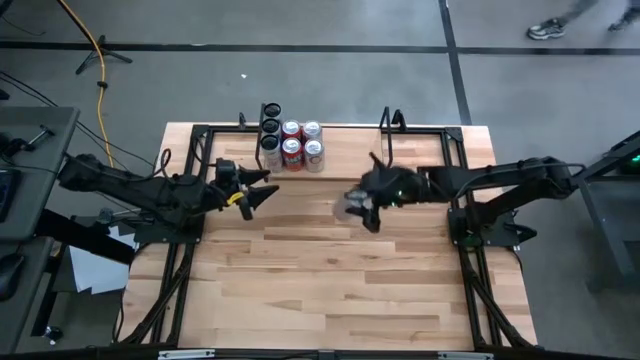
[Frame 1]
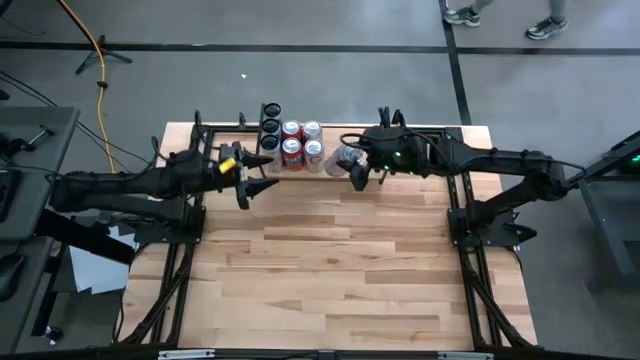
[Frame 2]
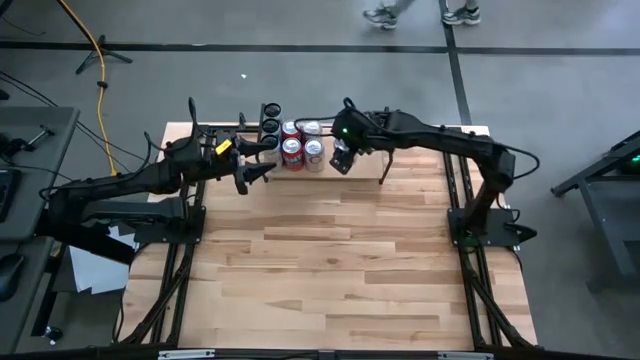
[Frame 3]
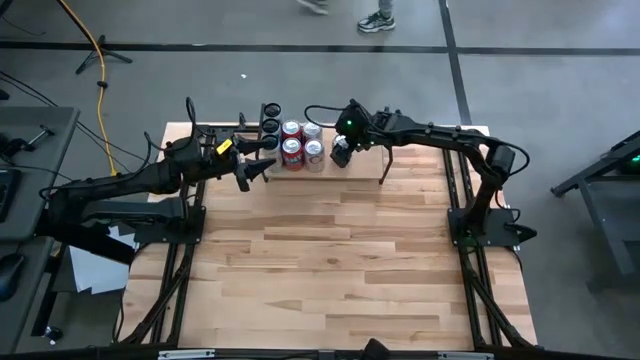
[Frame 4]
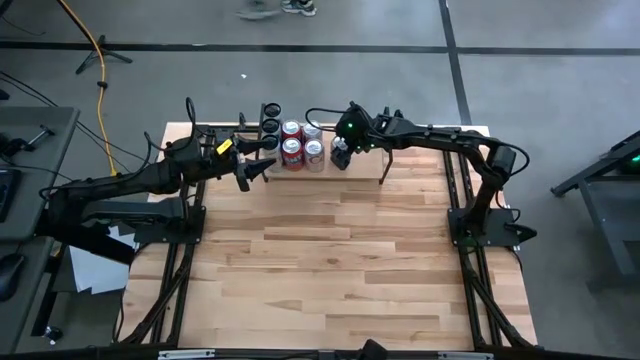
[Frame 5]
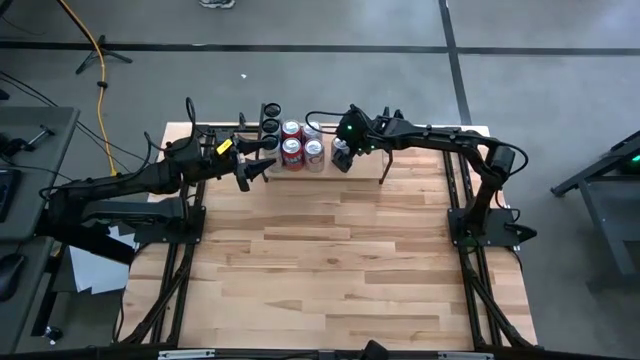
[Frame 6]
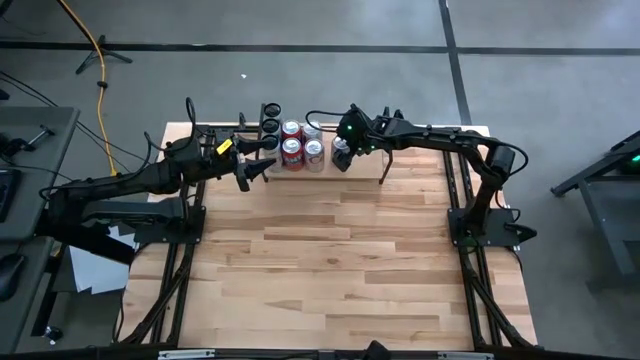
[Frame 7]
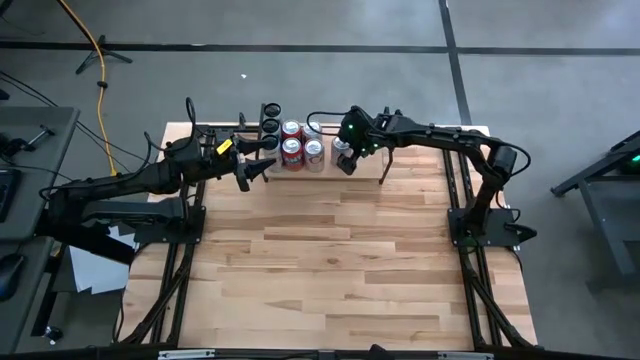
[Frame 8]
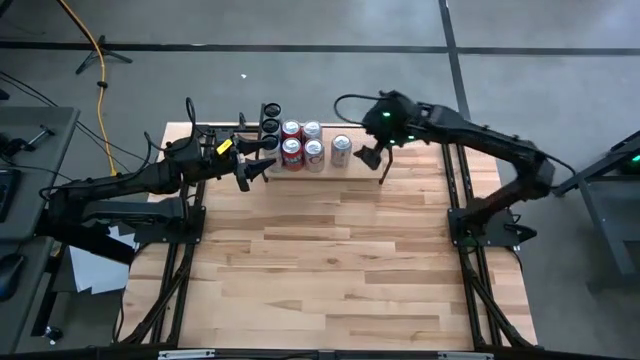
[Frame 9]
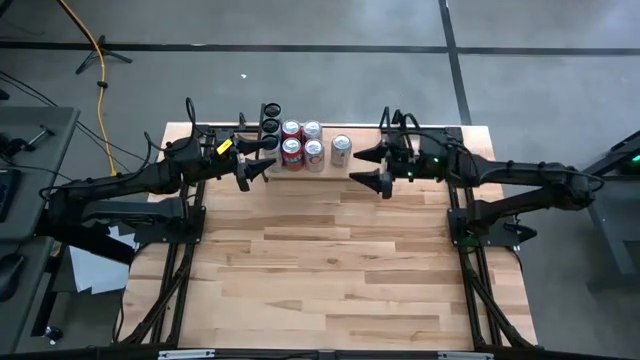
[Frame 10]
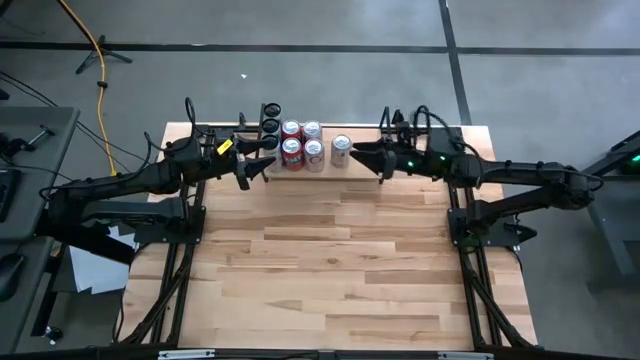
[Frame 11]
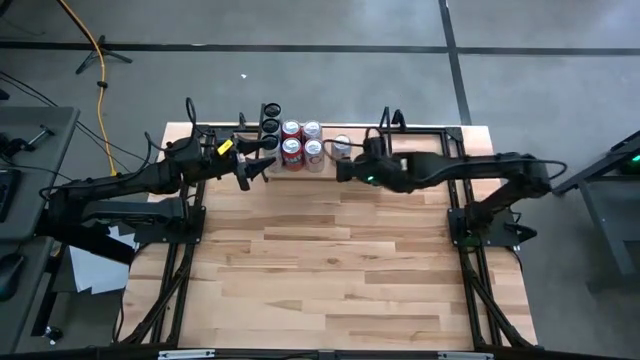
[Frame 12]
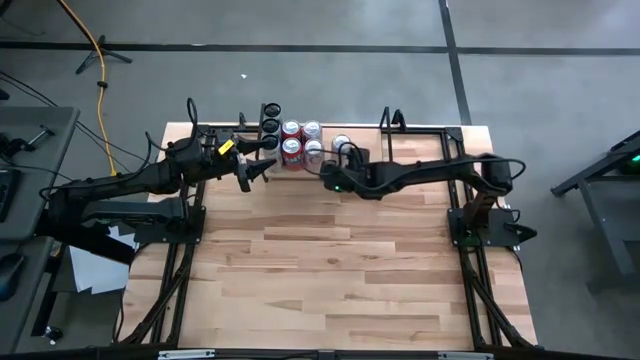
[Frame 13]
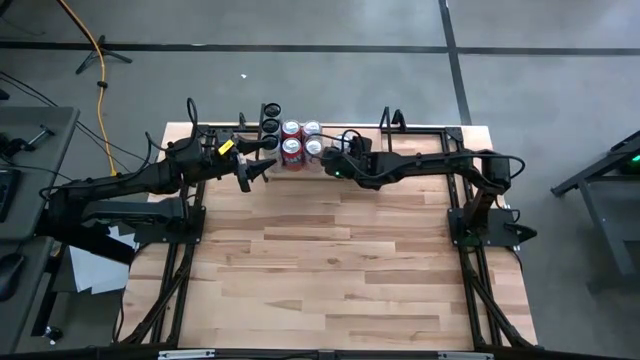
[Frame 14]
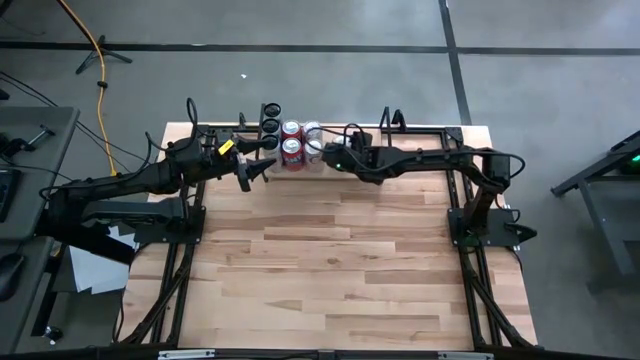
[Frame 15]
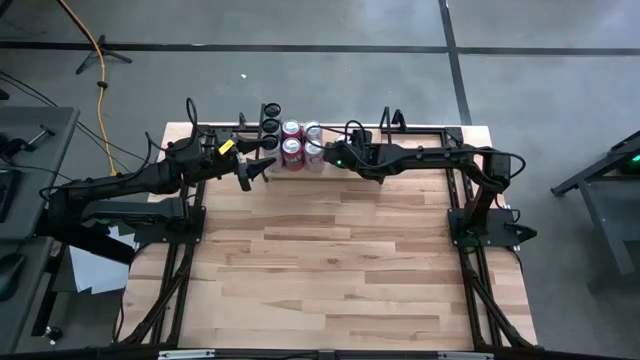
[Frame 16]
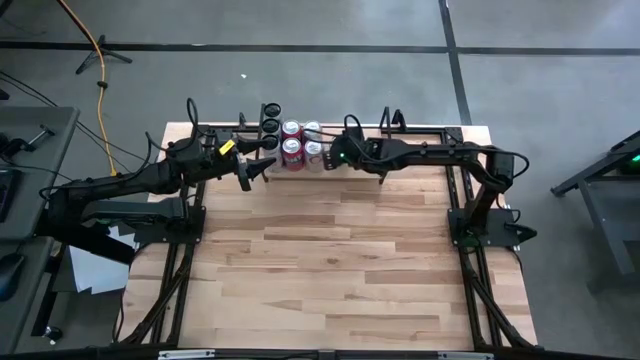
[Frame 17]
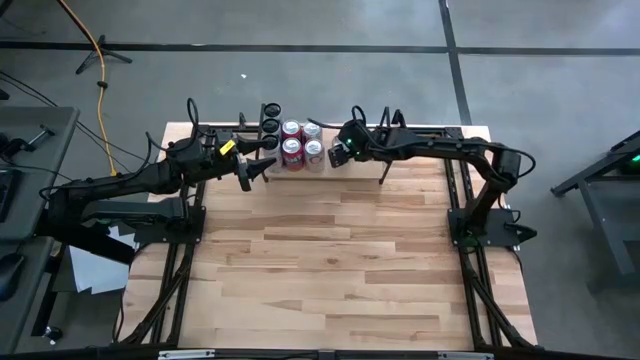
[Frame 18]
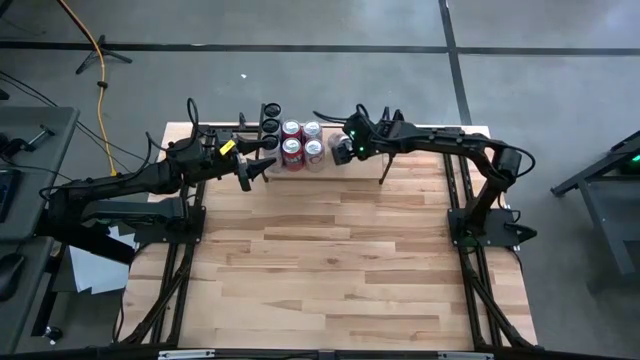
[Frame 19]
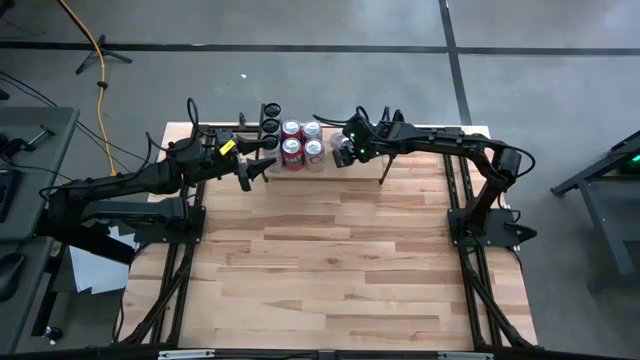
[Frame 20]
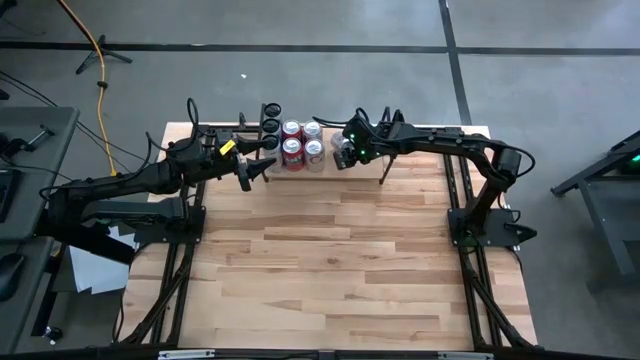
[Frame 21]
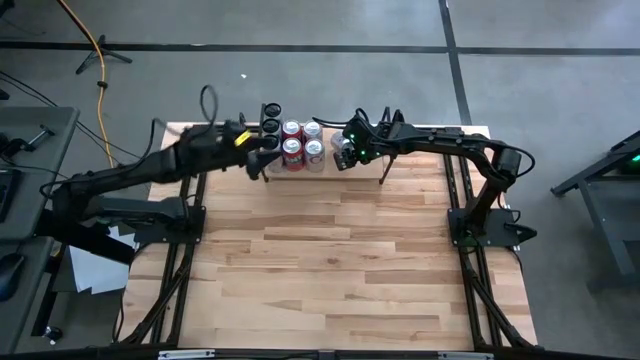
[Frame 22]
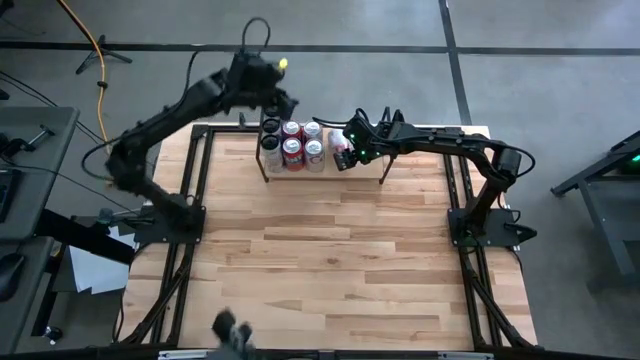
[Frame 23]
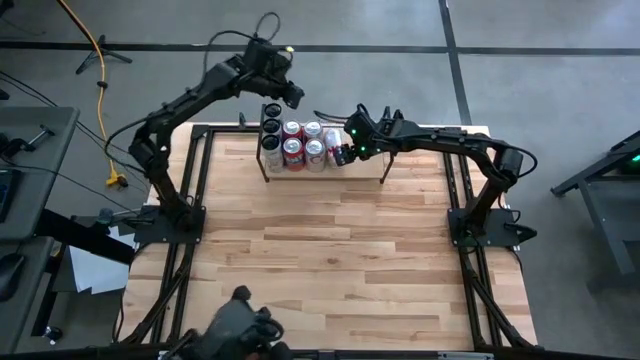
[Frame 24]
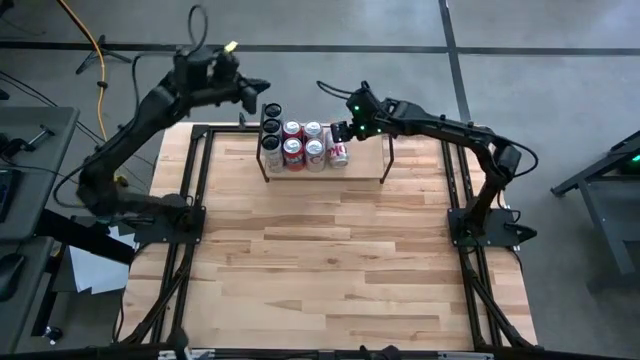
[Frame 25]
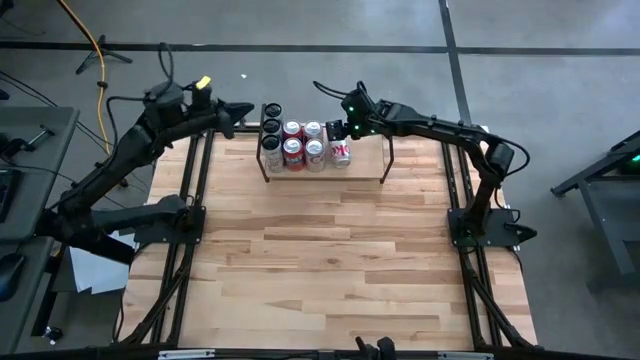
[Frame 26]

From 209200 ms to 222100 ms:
Task: Place canned beverage on shelf
Put the silver soda can aligned with the other silver soda can on the shelf

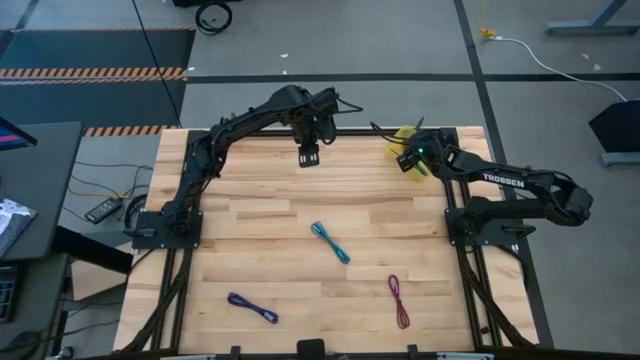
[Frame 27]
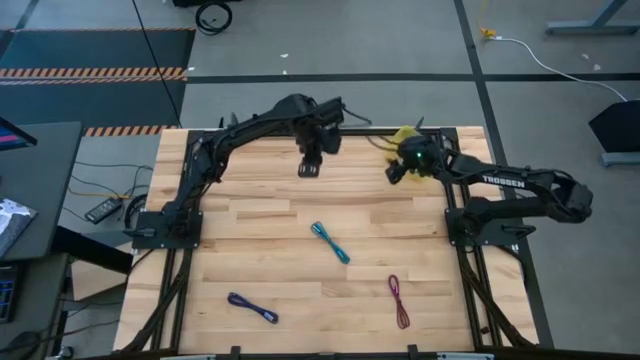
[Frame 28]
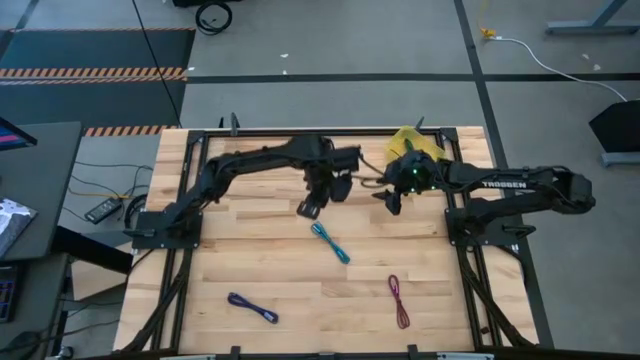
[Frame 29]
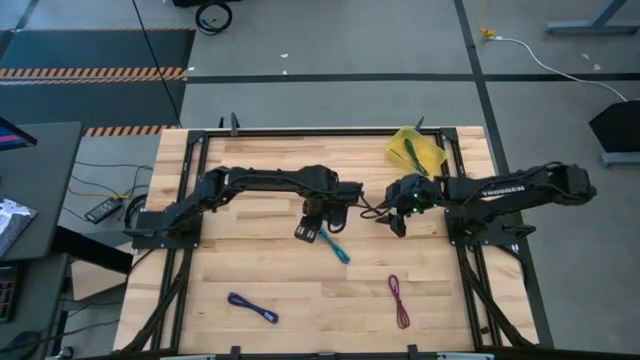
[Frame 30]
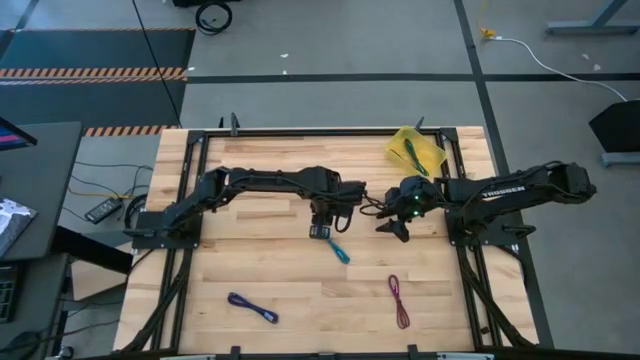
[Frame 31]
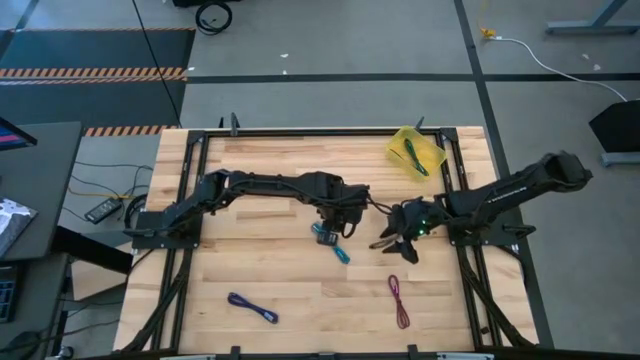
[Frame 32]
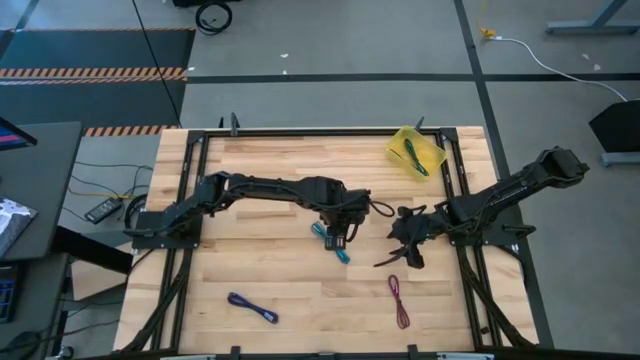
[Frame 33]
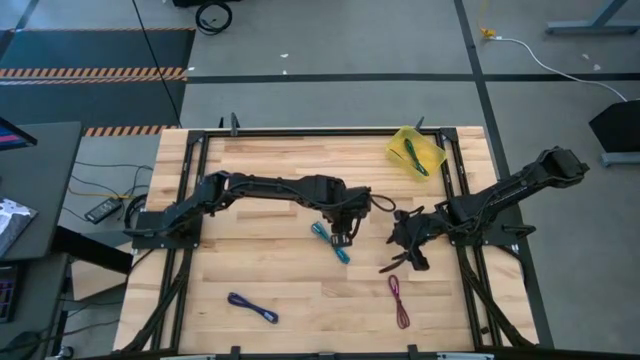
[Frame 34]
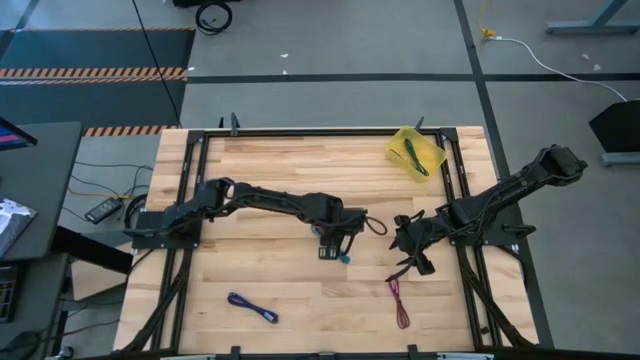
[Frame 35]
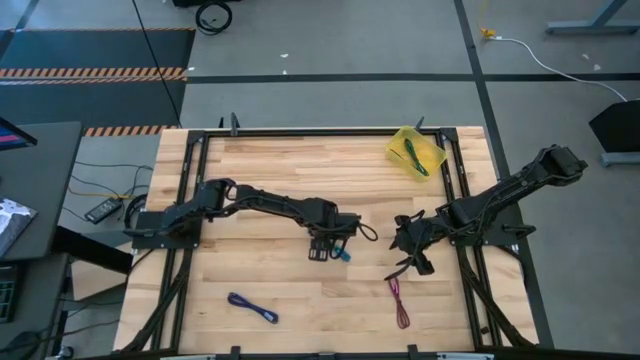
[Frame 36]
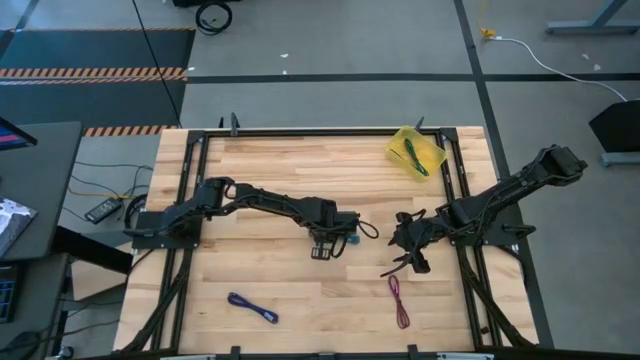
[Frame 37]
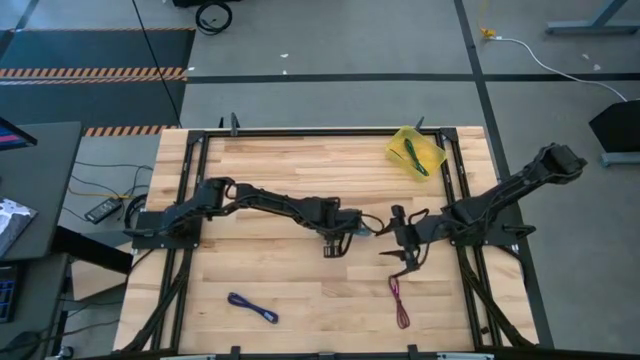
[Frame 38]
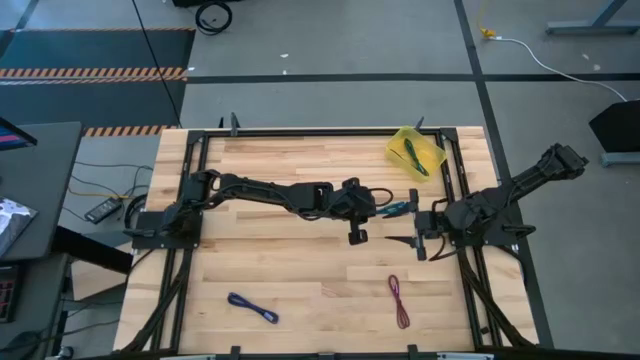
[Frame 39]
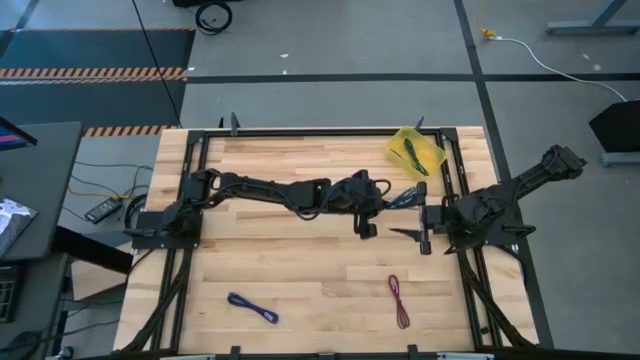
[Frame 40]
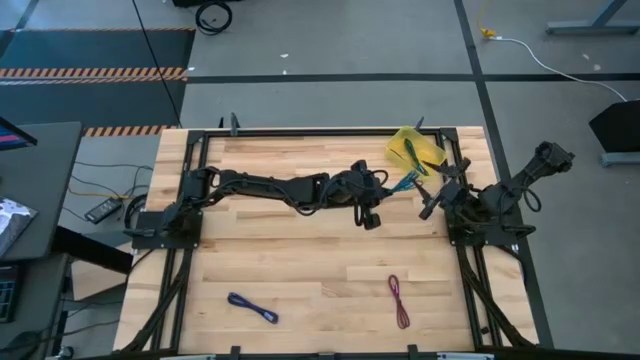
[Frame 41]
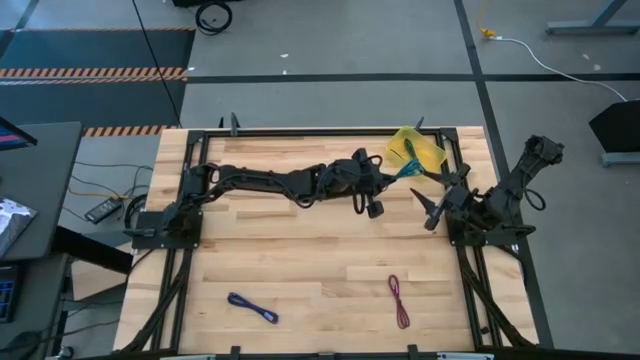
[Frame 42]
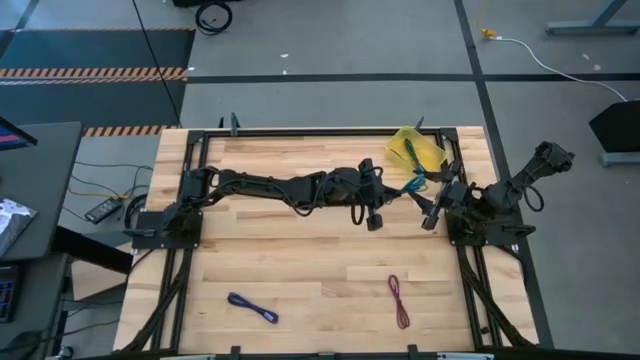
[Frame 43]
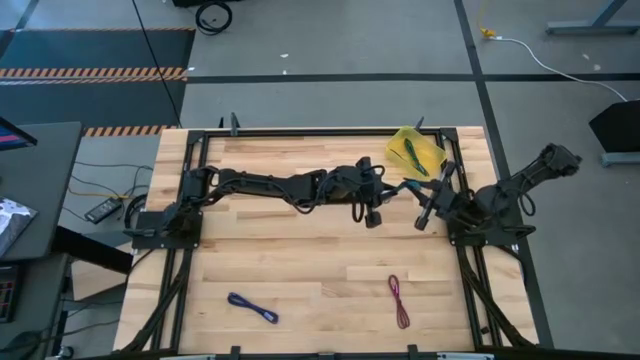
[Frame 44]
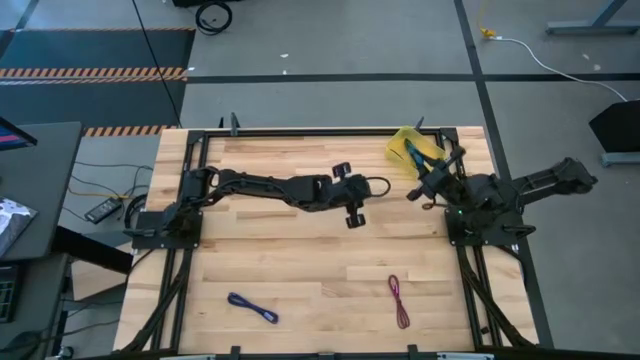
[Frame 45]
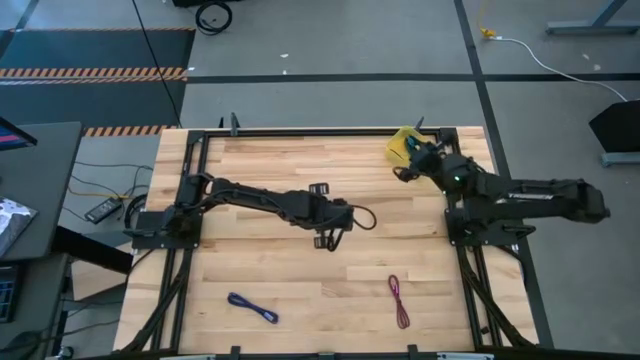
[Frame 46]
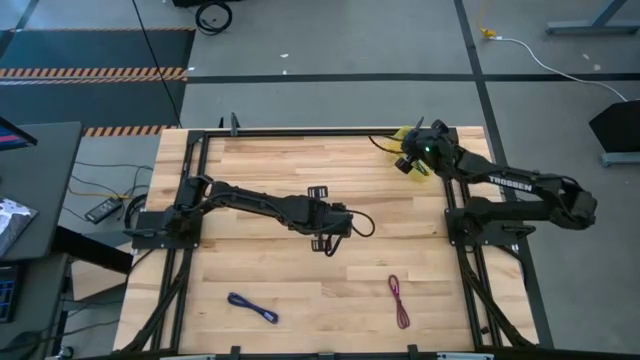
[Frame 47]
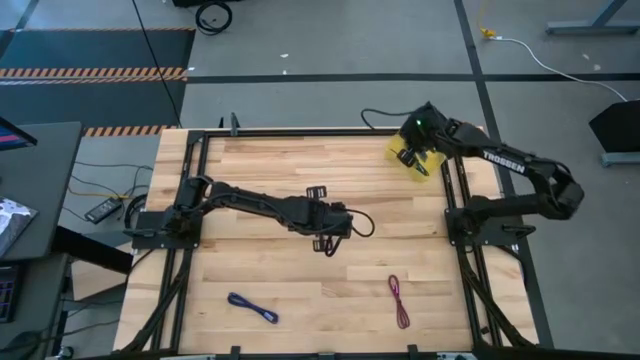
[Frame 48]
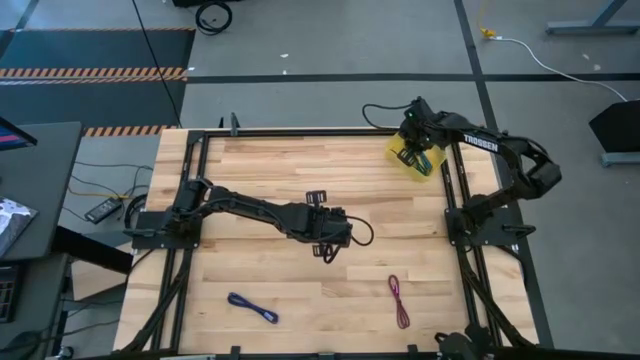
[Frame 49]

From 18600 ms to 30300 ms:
Task: Pick and place USB-C Cables
Put the blue charger cable into the yellow container
